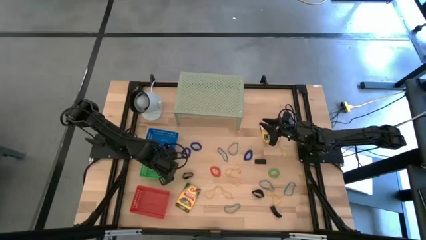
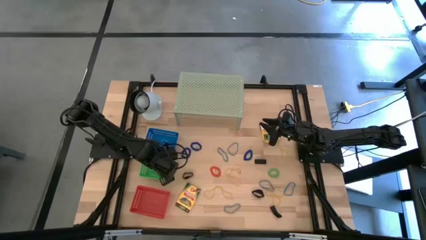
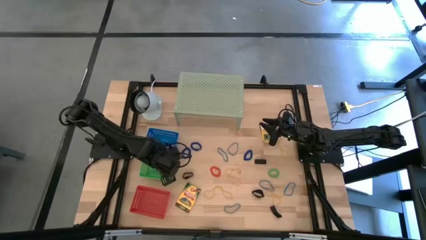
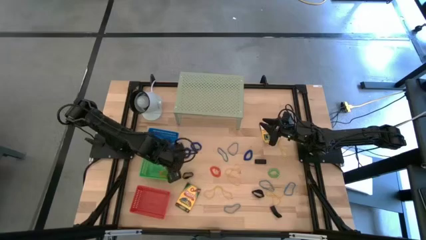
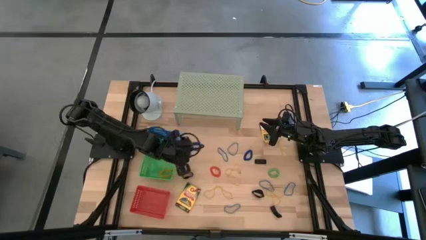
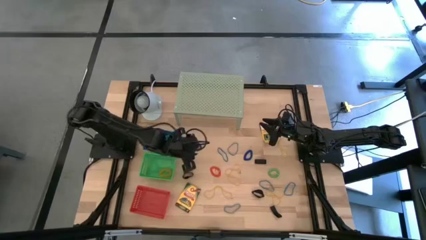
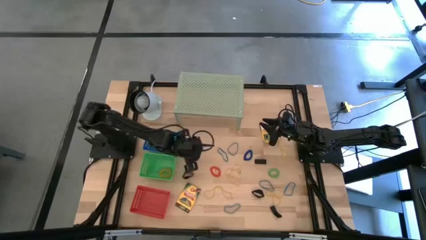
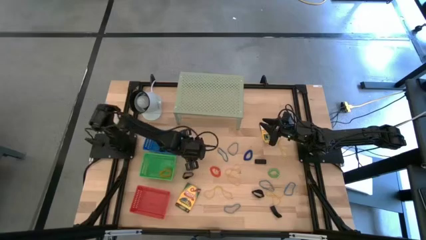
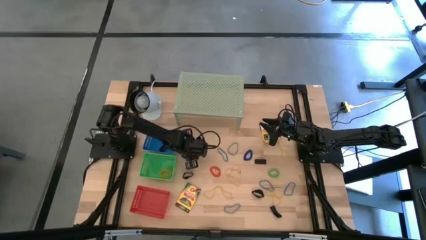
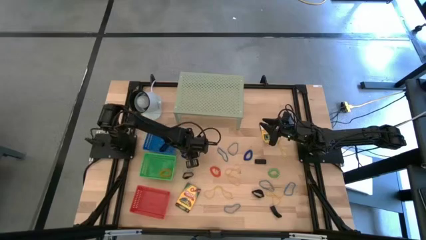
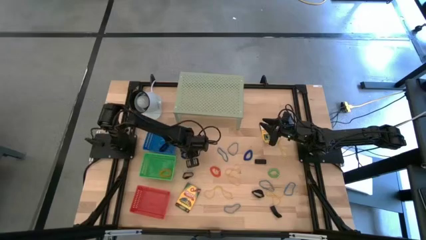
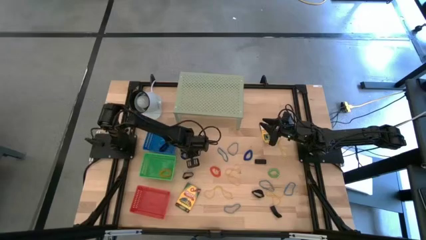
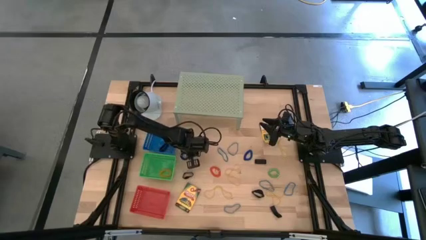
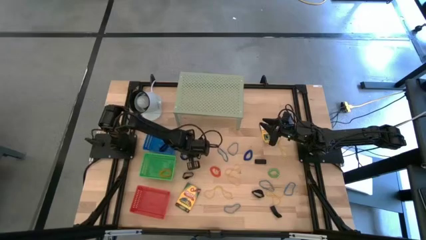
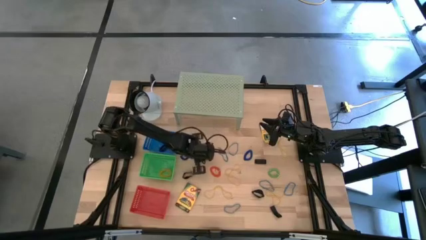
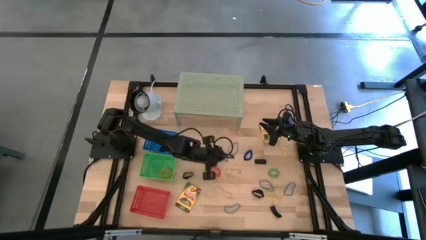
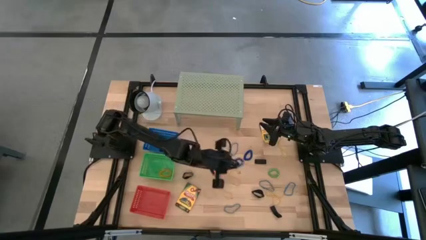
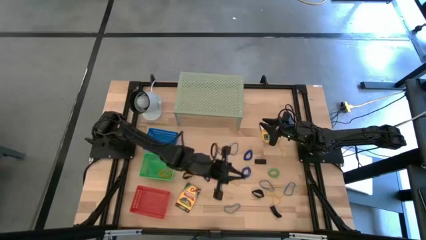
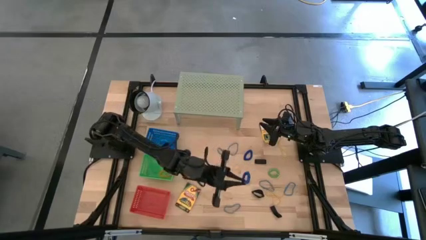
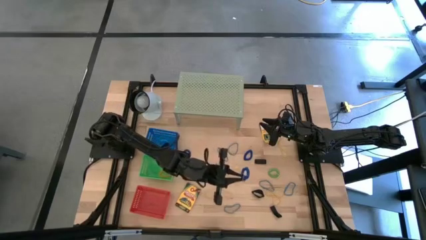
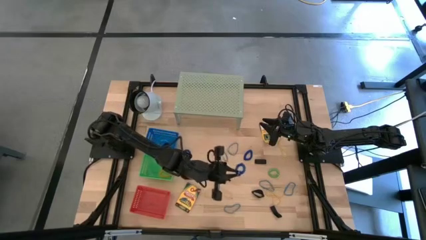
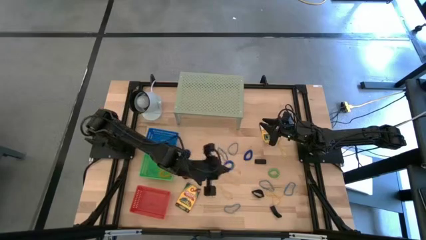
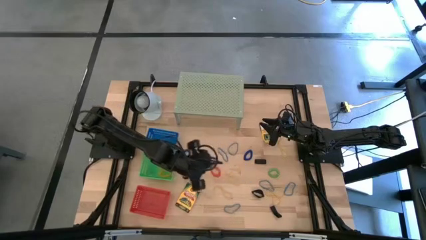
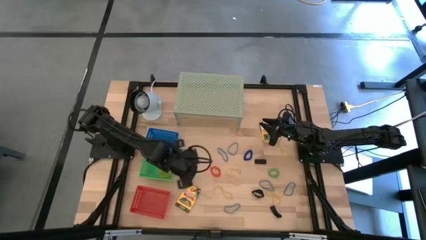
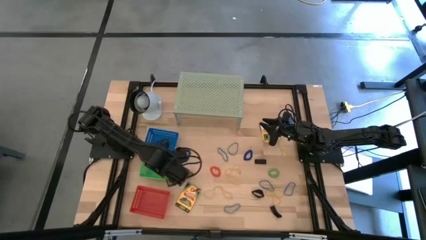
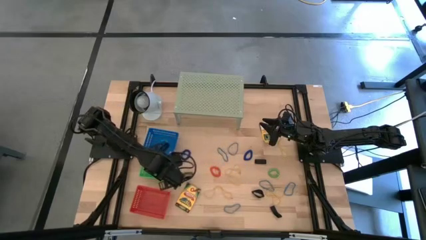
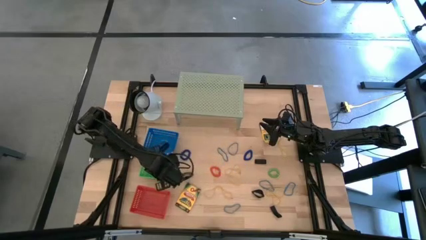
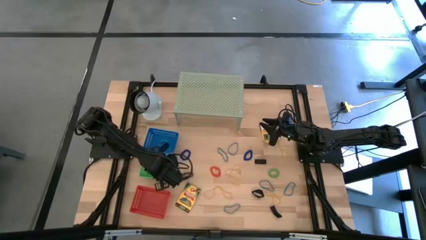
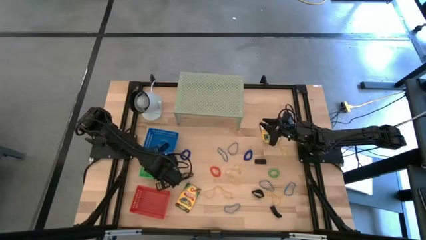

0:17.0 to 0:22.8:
Task: Pick & Place Office Desk Supplies
Put the blue spring keychain into the green bin

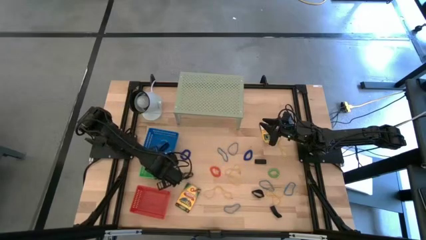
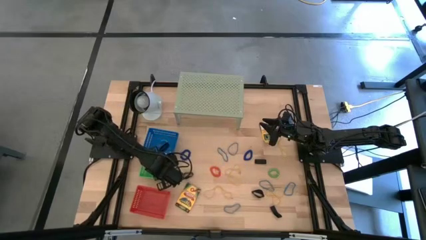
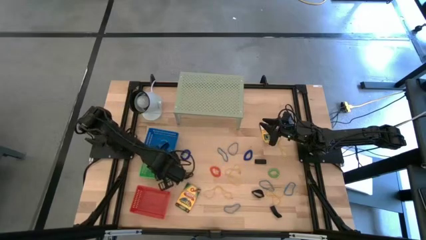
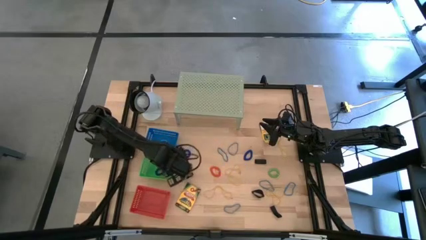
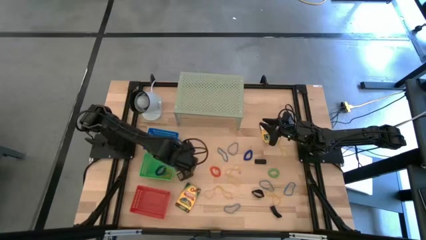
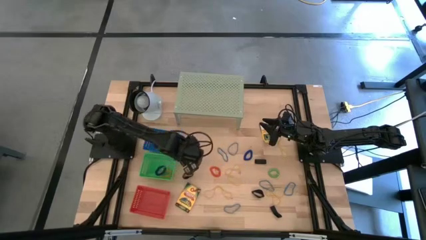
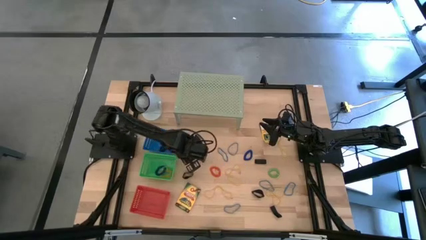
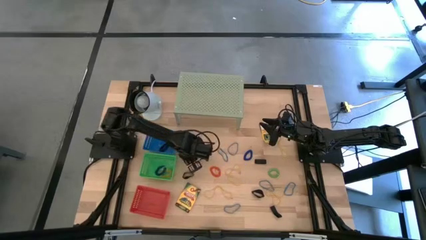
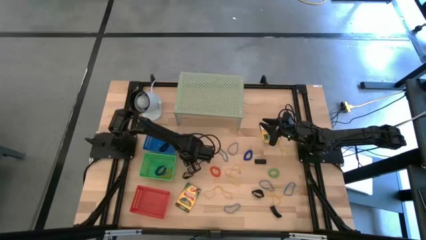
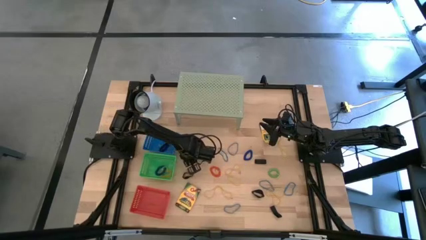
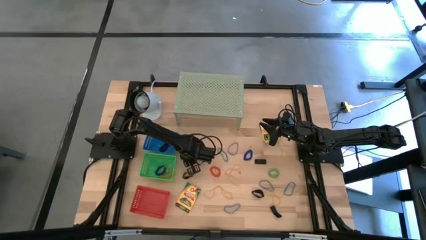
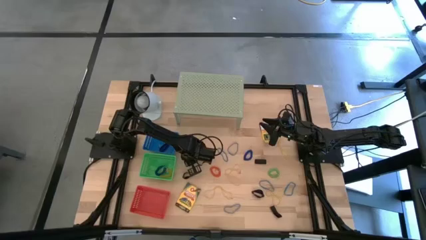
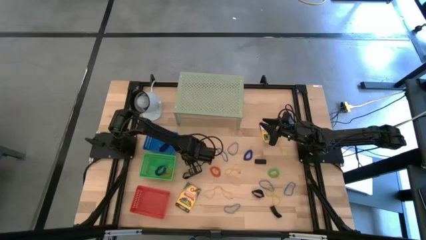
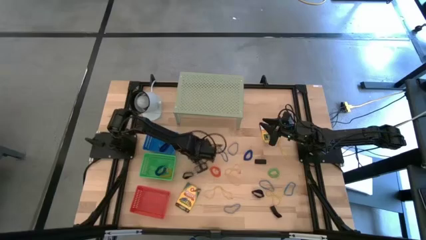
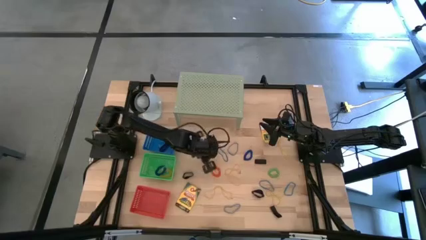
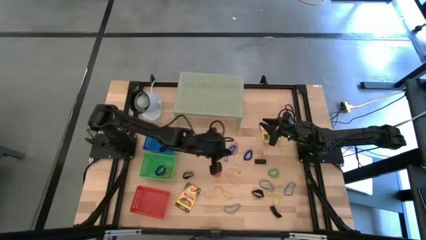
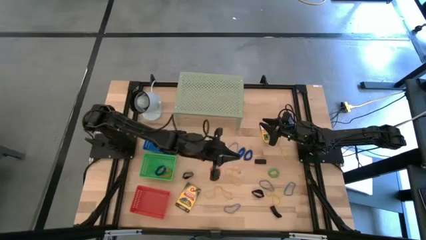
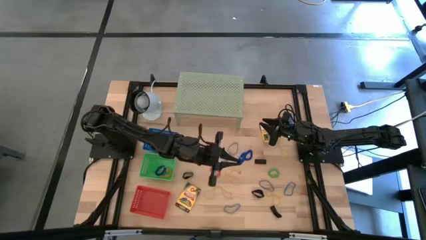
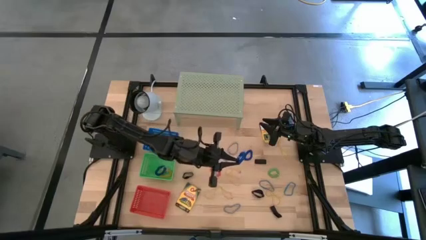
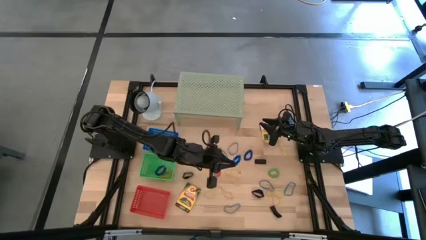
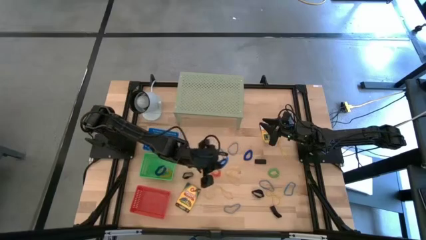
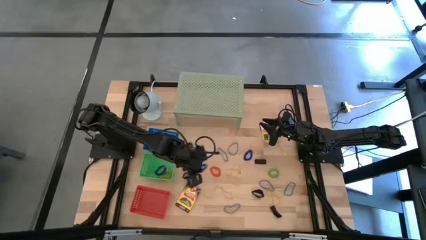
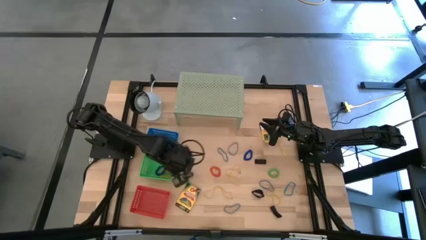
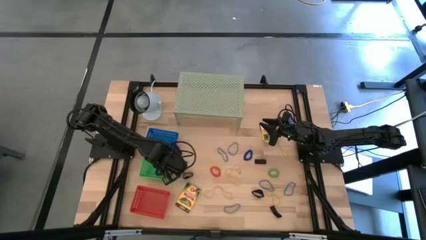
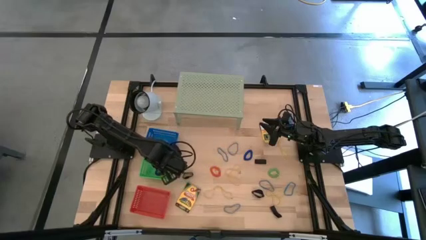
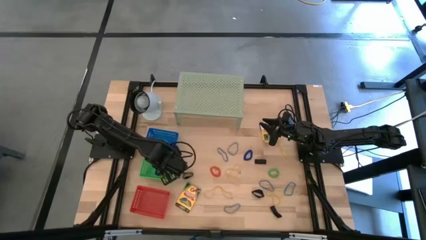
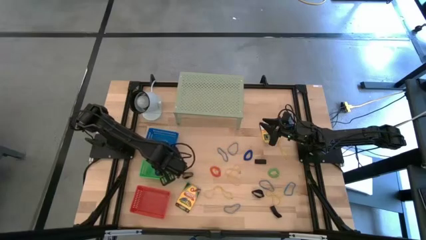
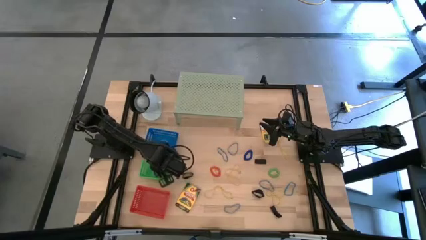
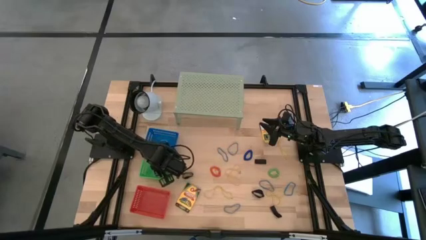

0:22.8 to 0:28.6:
Put the blue spring keychain into the green bin

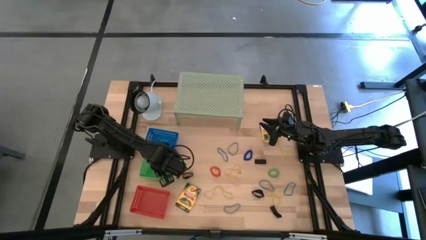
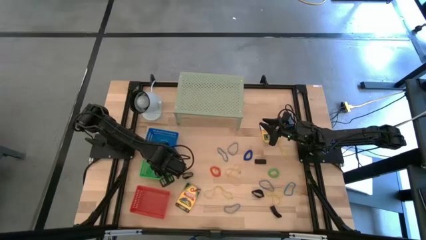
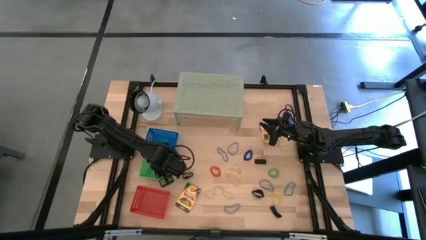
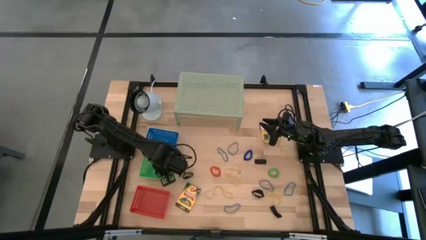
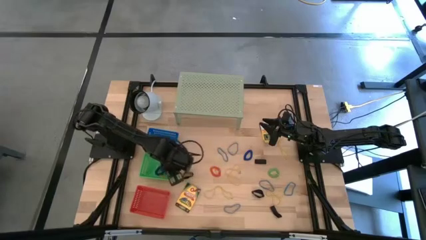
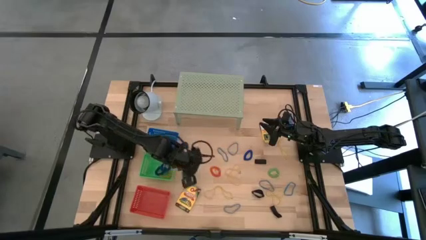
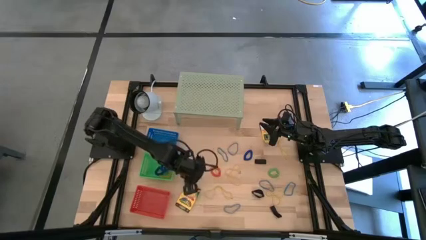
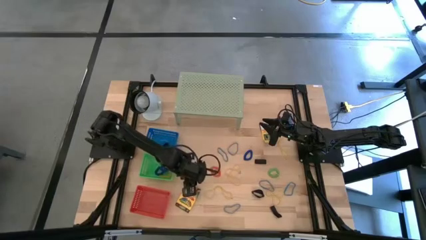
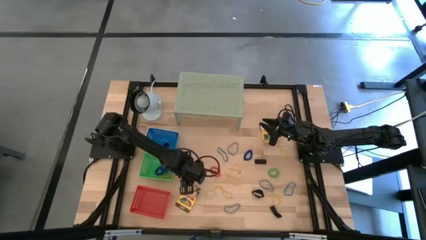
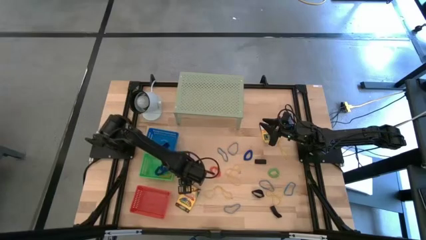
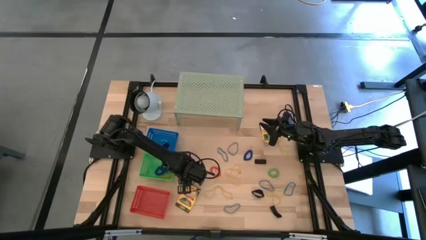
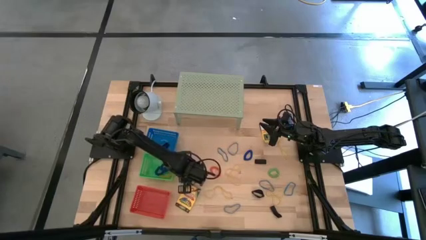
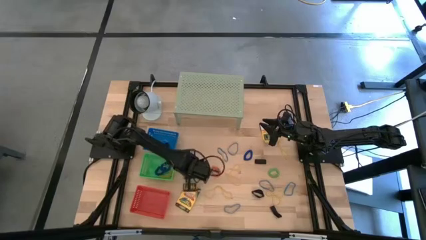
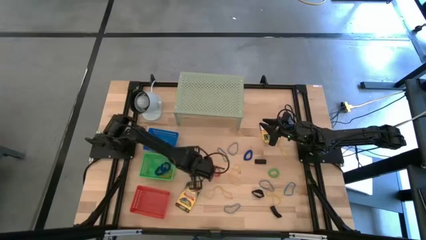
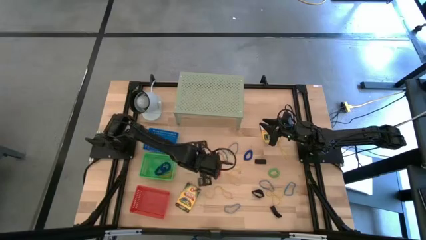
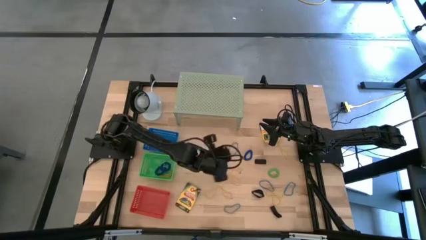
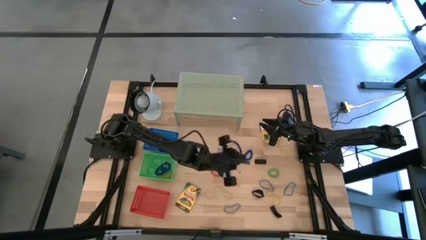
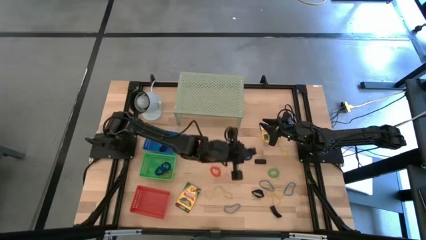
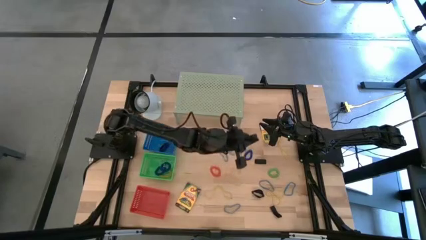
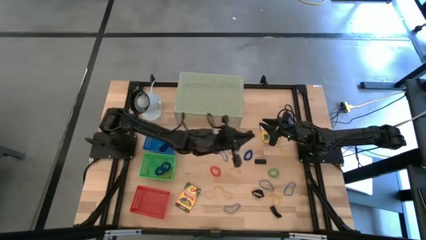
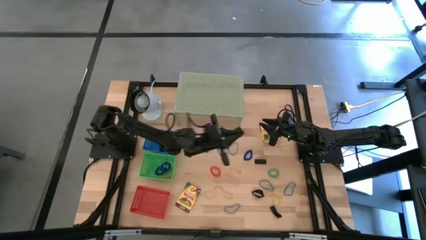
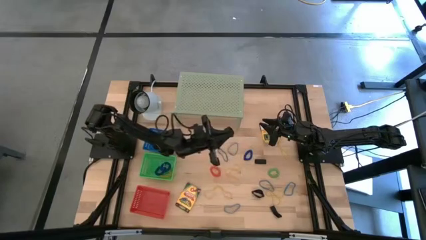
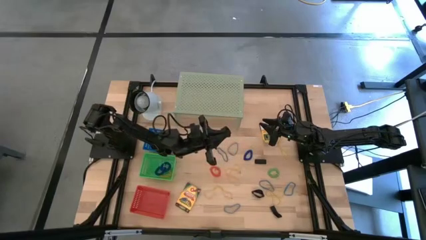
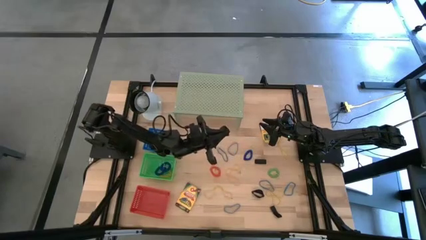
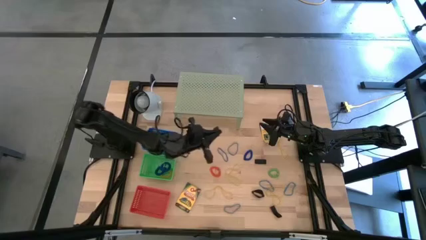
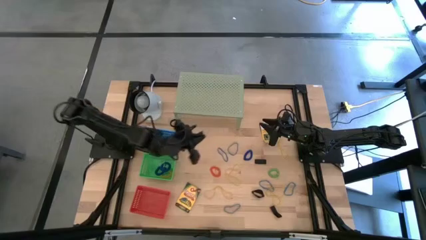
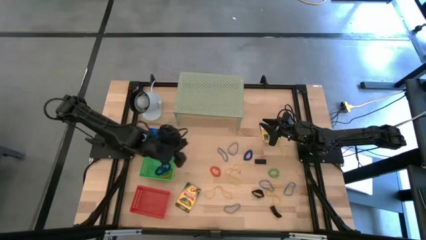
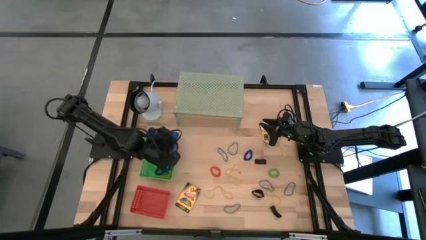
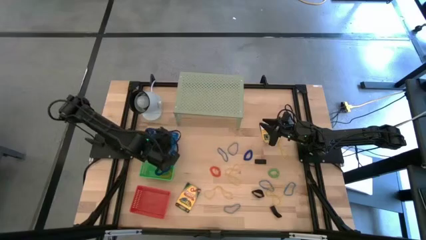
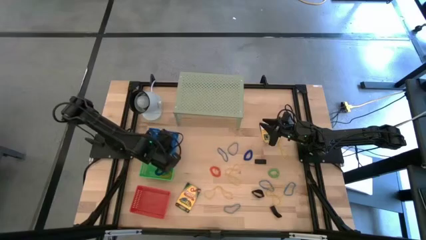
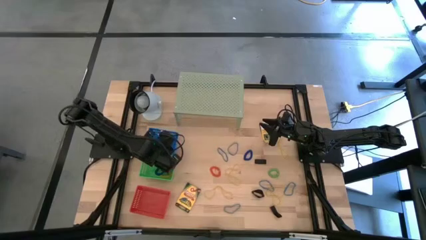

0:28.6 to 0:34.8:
Put the black rubber band into the blue bin
